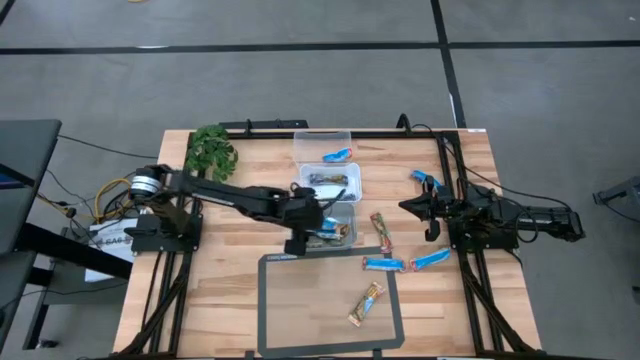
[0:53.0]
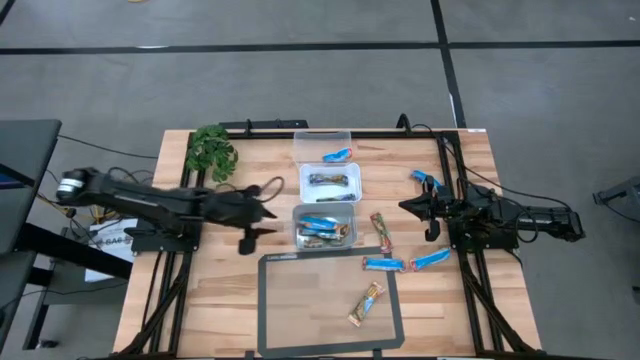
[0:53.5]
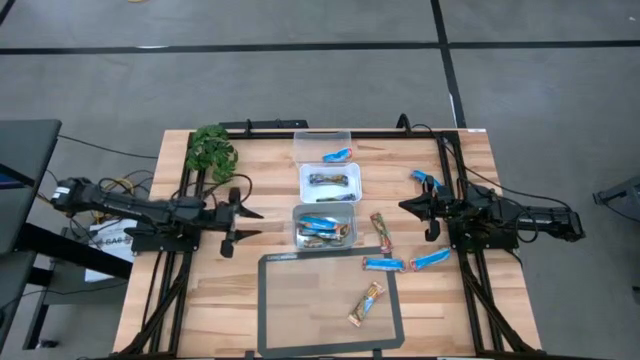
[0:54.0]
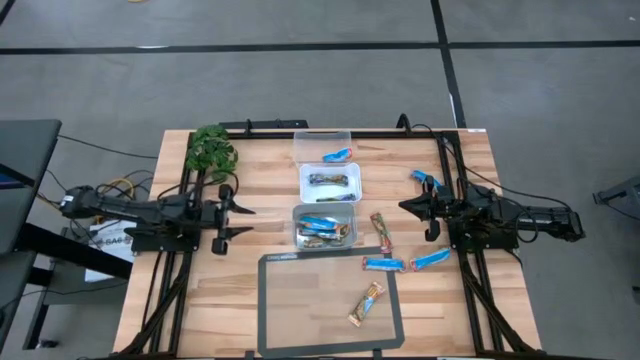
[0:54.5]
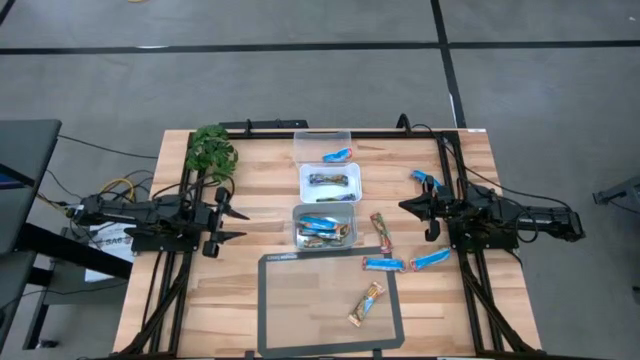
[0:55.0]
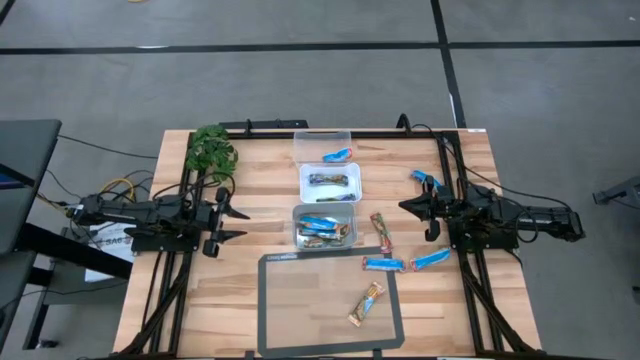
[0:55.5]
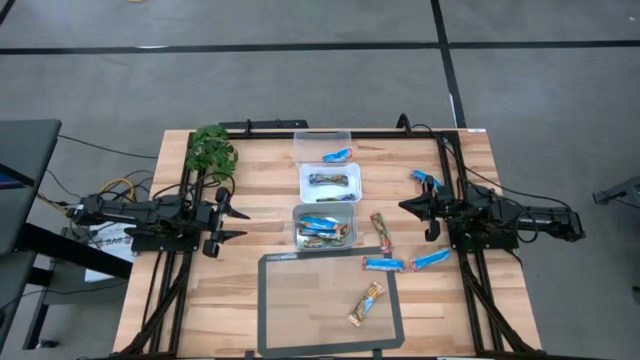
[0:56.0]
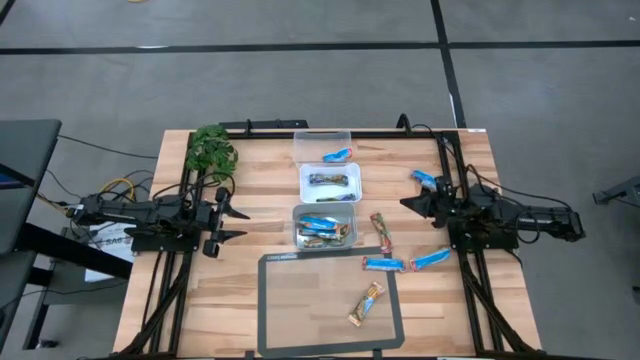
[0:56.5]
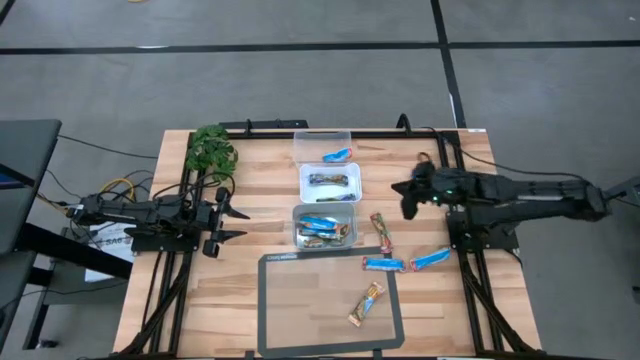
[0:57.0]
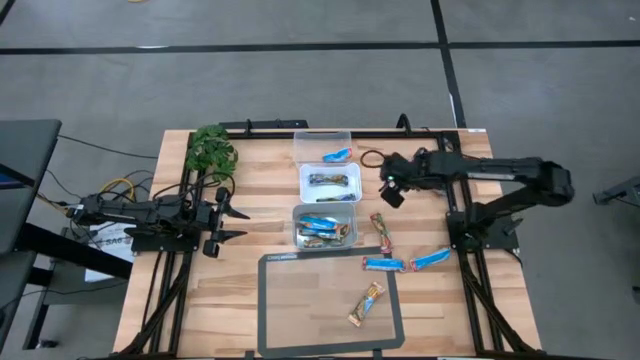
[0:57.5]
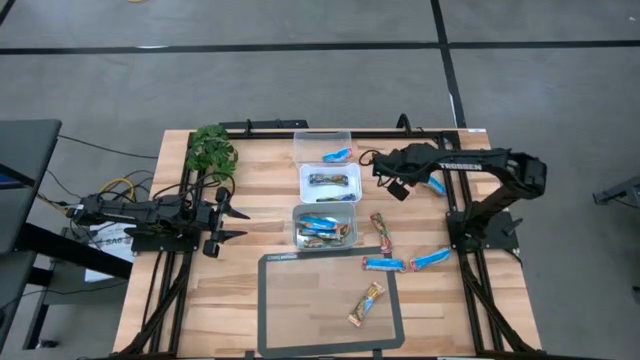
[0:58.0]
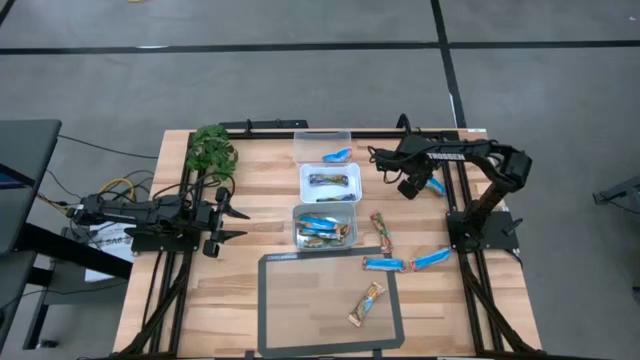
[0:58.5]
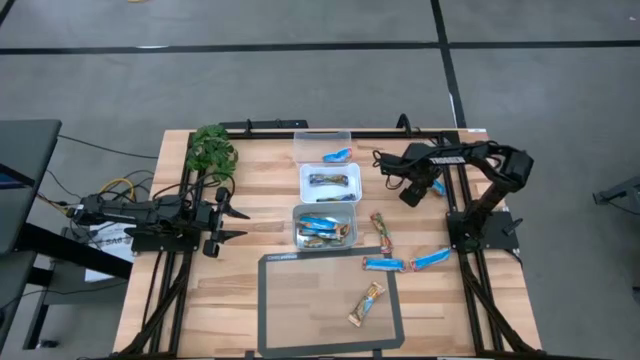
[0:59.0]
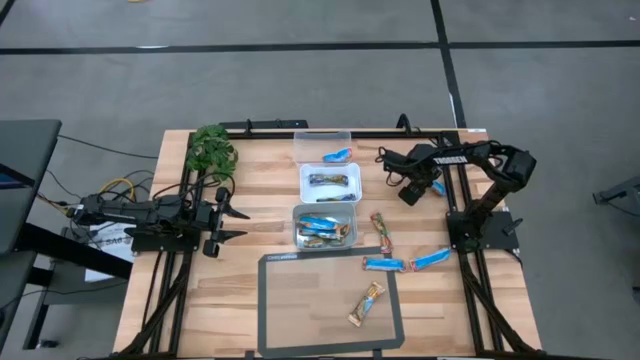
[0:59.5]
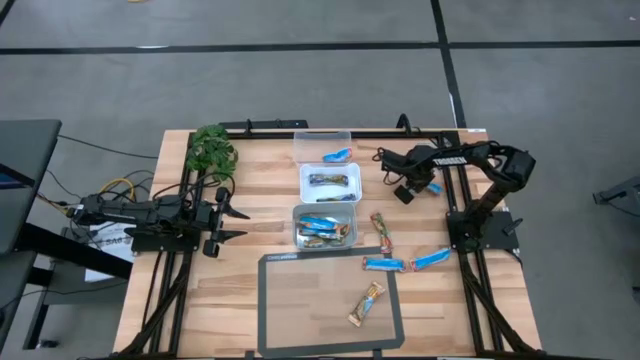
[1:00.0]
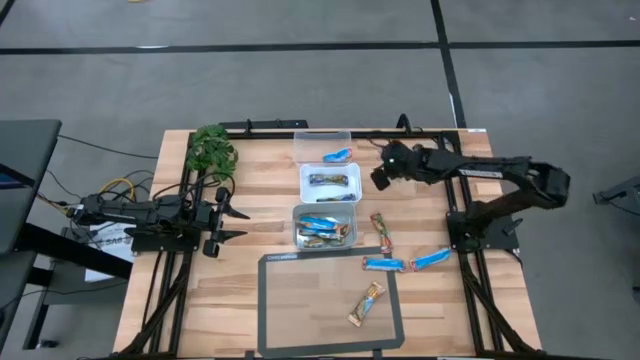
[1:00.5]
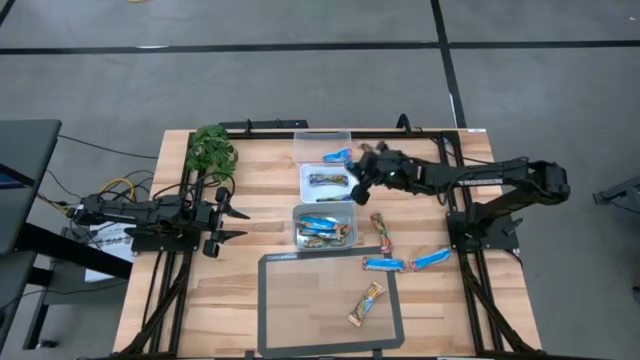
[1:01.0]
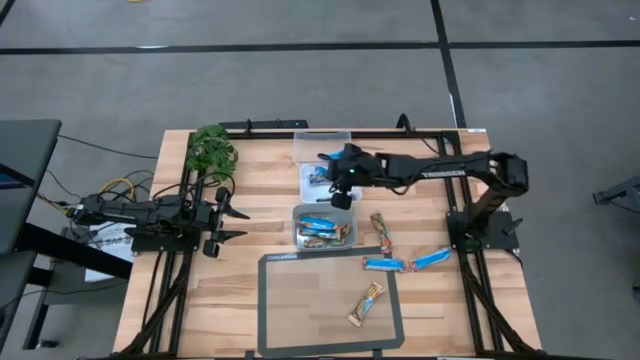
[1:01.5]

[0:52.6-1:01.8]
Task: Pick and place Granola Bars by type
Put the blue granola bar into the white bin

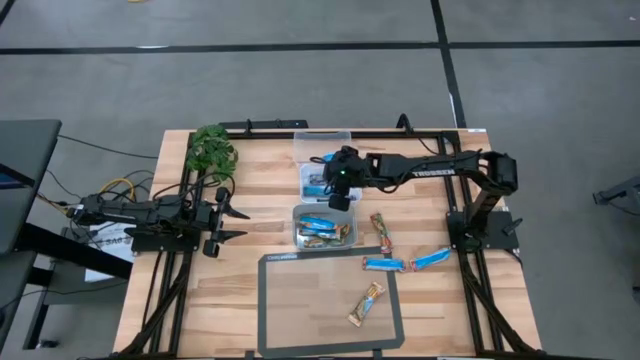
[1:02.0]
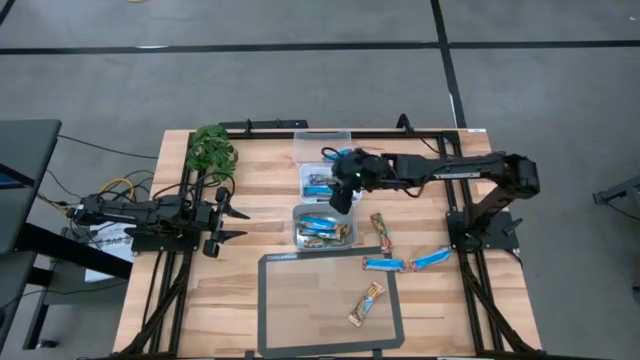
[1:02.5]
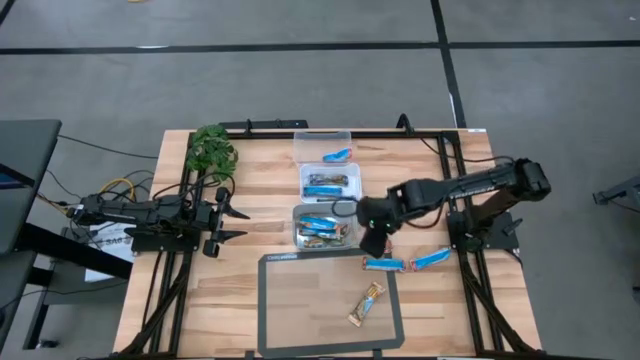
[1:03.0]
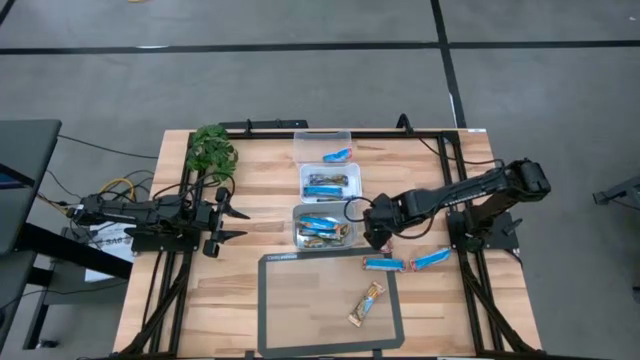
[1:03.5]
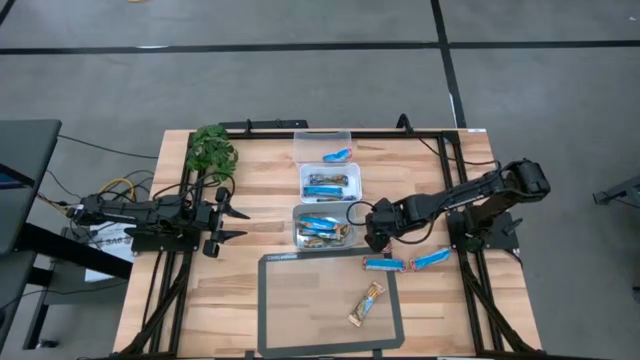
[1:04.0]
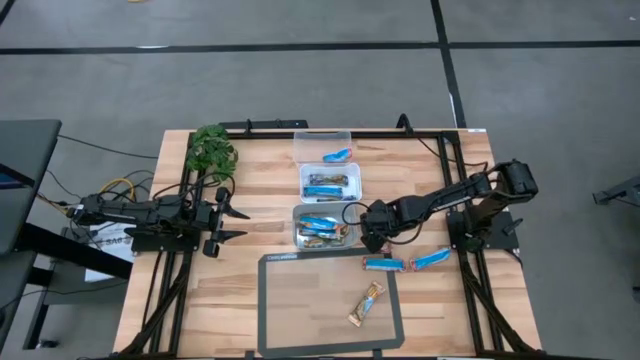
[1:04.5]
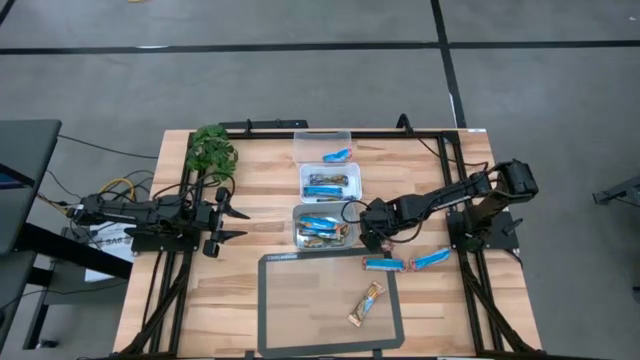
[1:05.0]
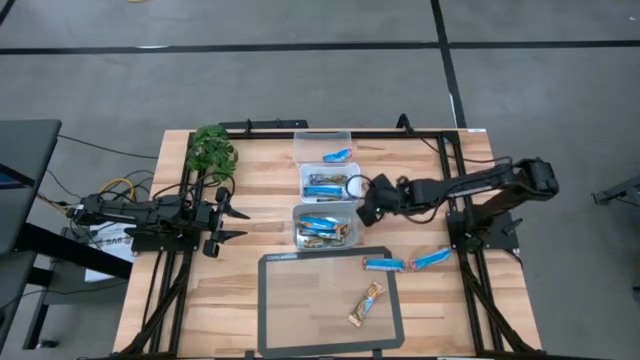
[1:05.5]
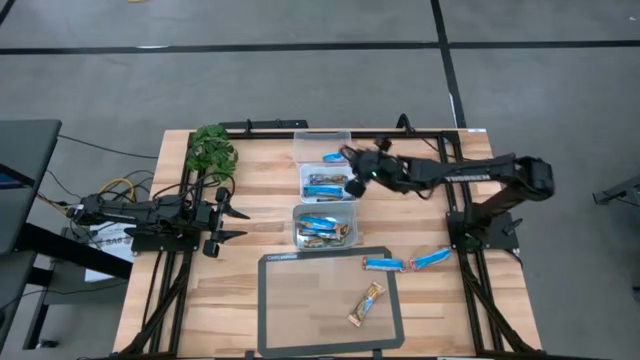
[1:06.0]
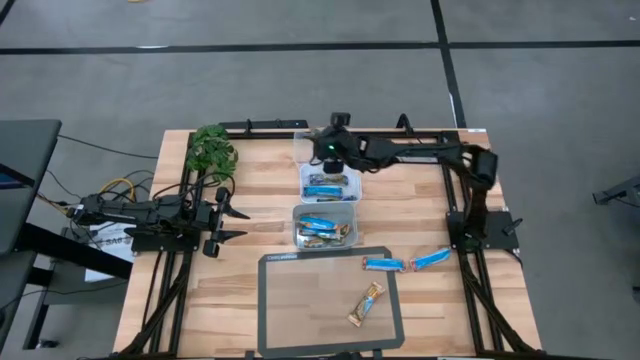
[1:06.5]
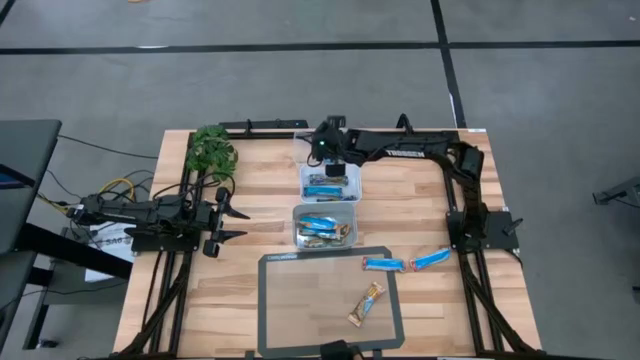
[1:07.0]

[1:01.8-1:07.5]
Put the red granola bar into the transparent bin

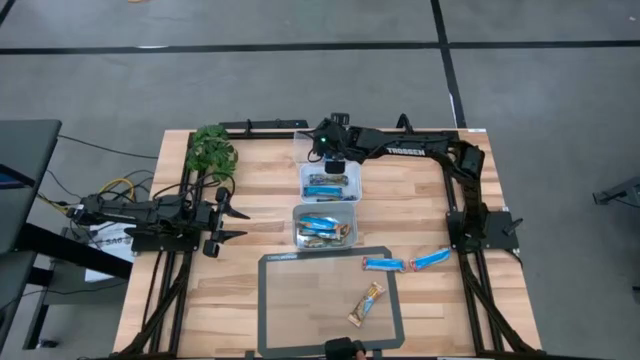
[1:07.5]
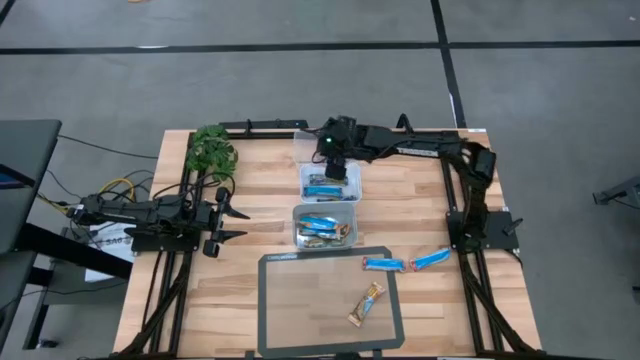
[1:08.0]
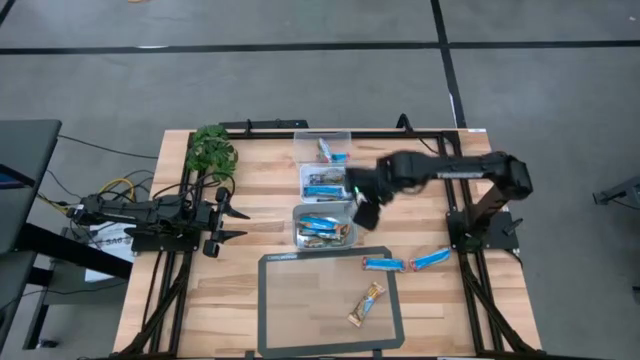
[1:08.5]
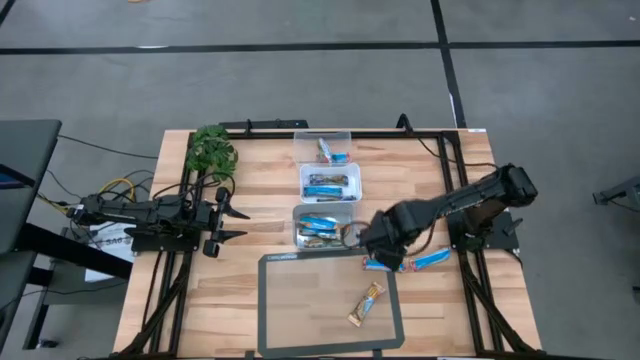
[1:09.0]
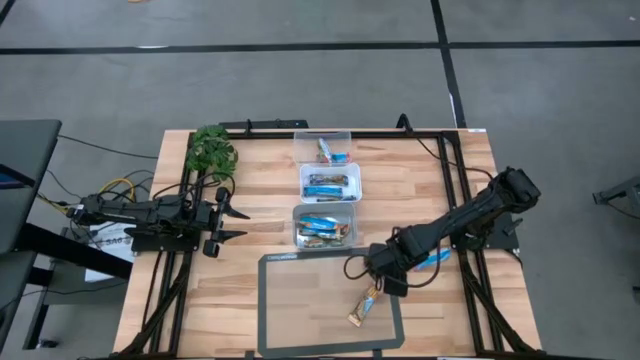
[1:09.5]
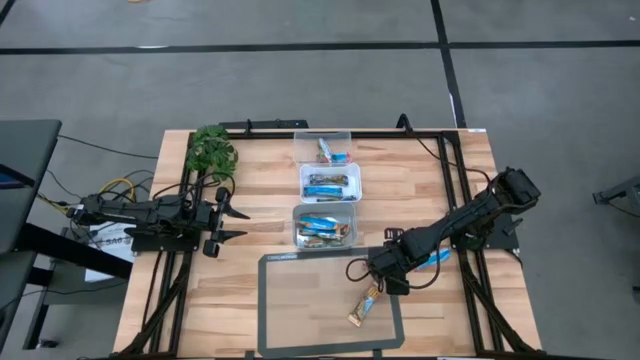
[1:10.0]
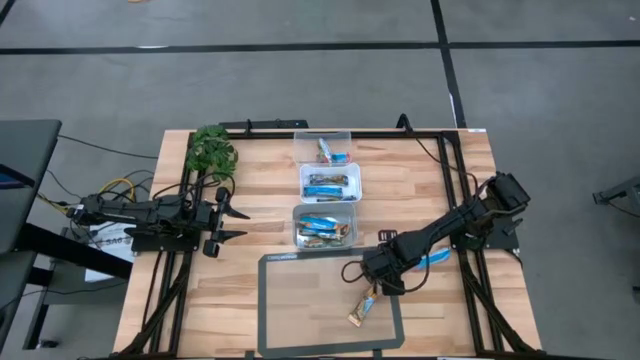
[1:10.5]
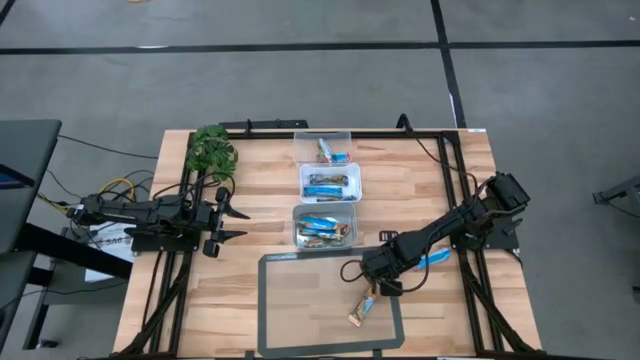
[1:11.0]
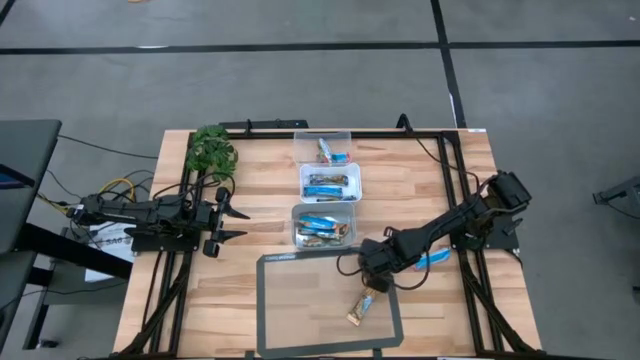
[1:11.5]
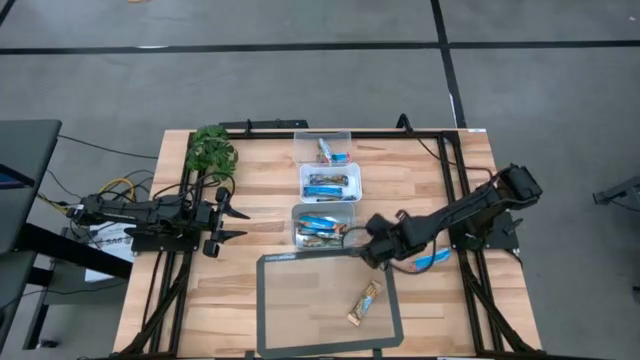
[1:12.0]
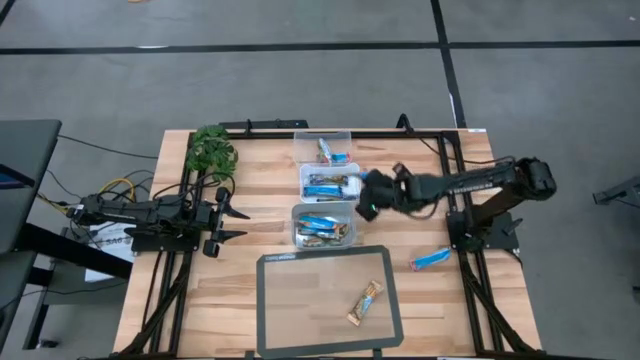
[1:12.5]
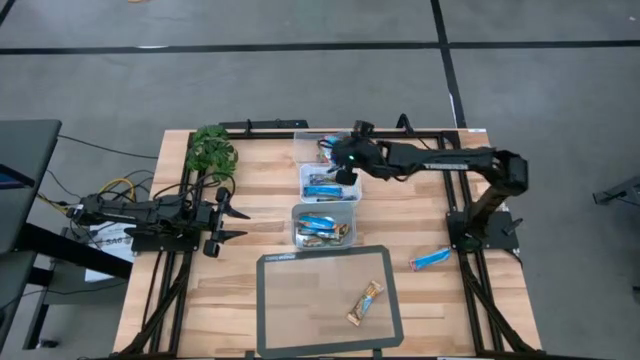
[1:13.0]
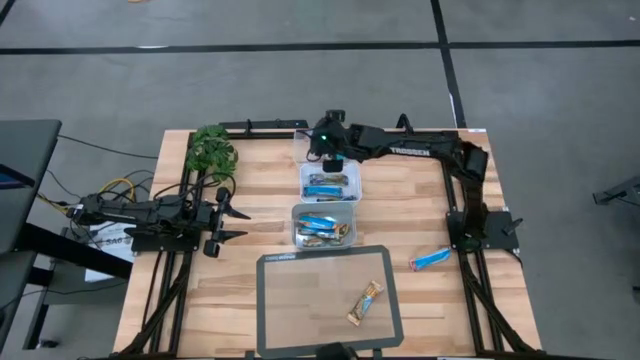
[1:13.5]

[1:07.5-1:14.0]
Put the red granola bar into the transparent bin
